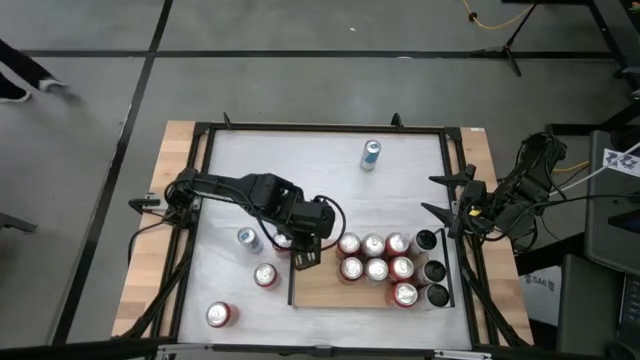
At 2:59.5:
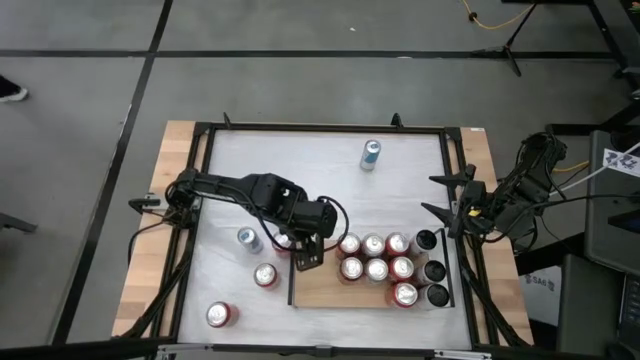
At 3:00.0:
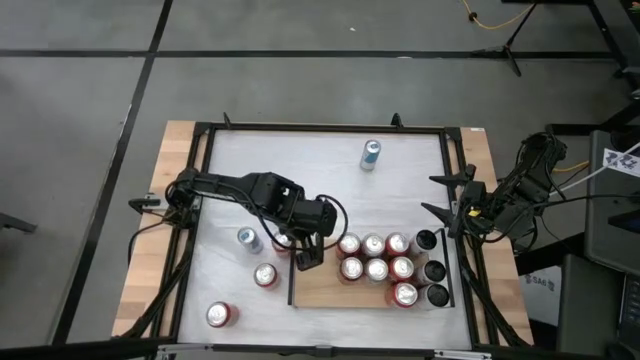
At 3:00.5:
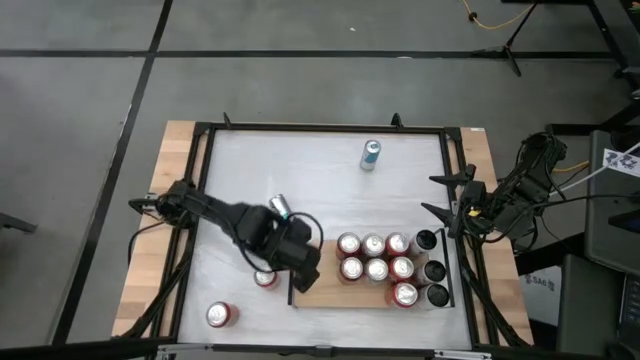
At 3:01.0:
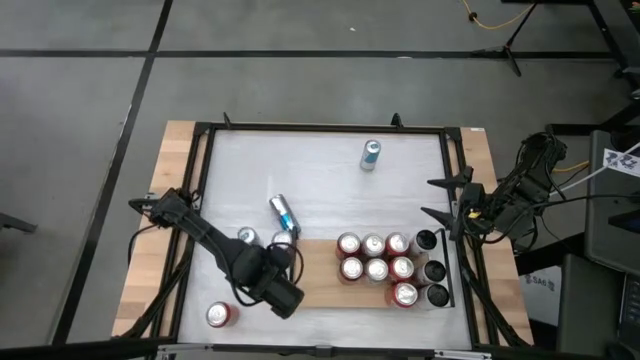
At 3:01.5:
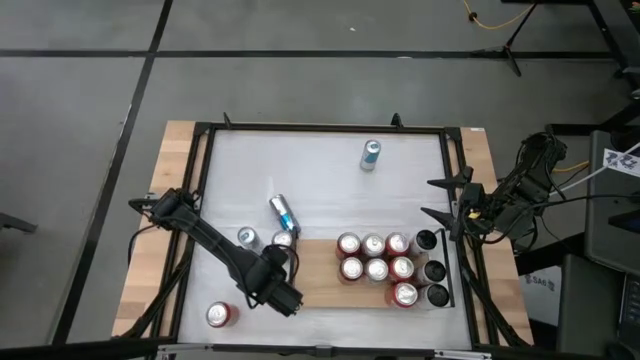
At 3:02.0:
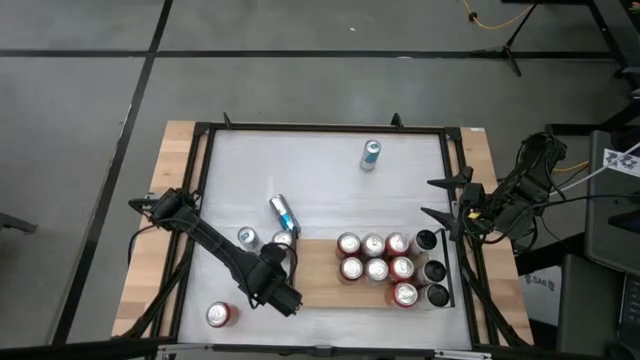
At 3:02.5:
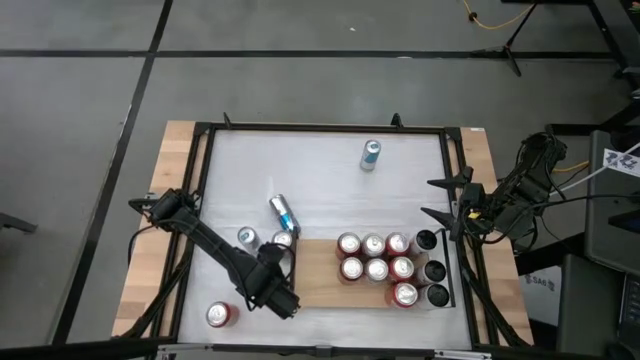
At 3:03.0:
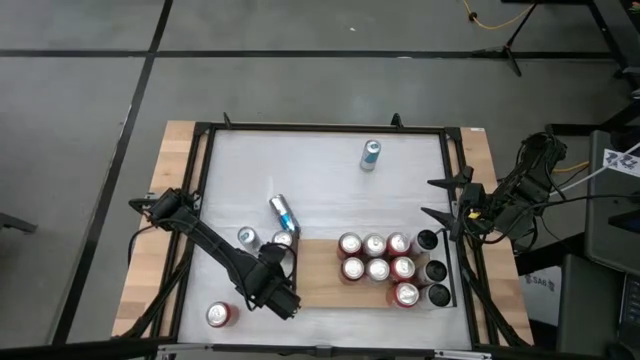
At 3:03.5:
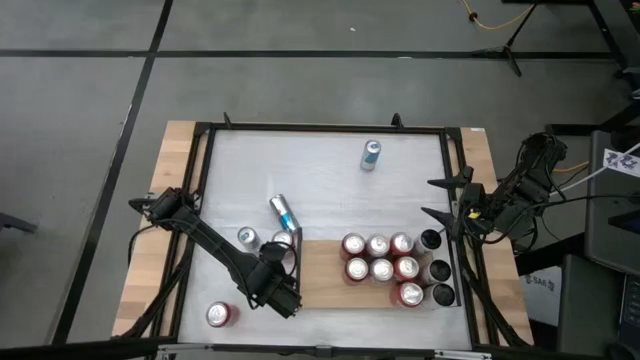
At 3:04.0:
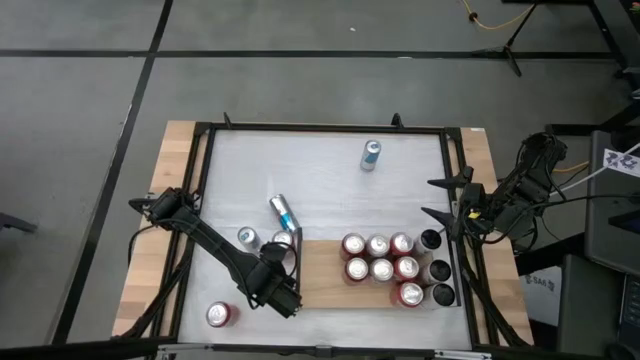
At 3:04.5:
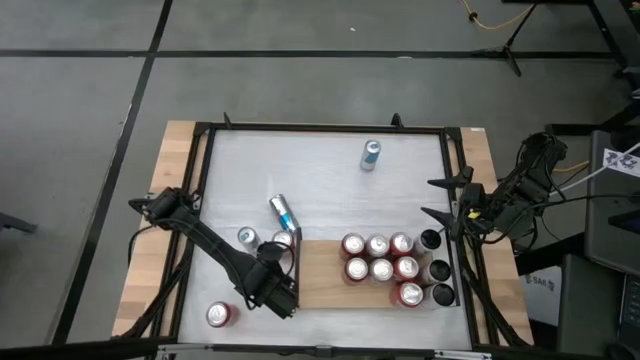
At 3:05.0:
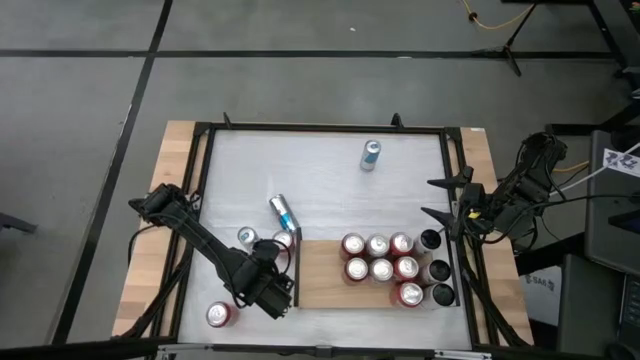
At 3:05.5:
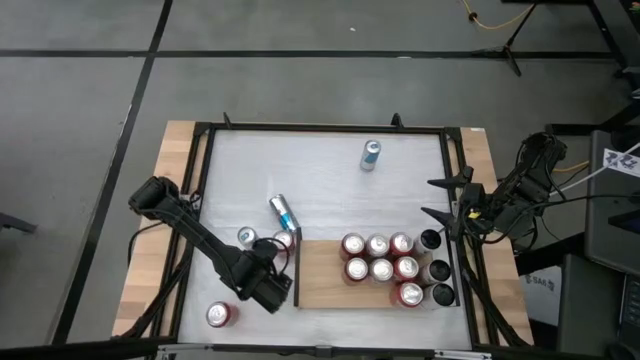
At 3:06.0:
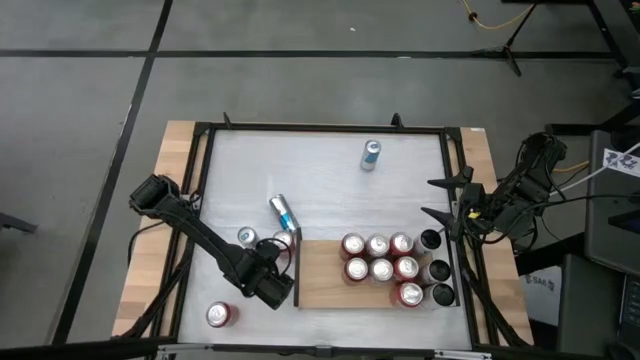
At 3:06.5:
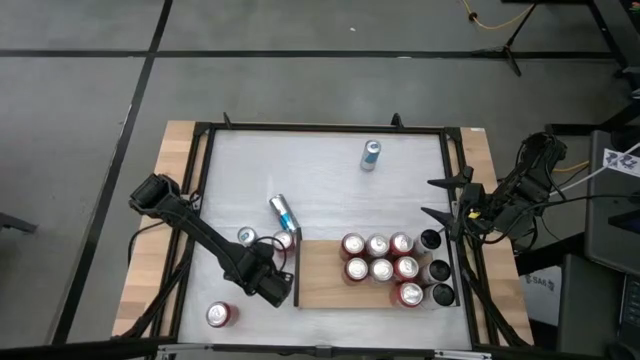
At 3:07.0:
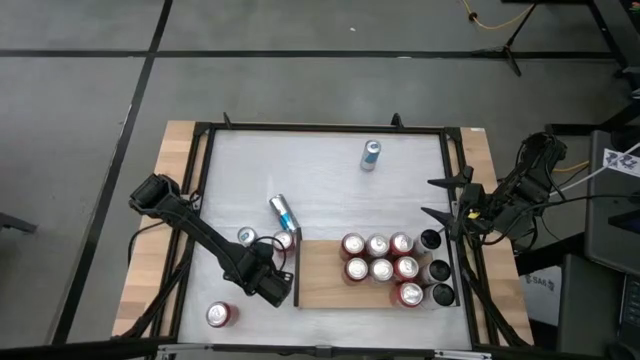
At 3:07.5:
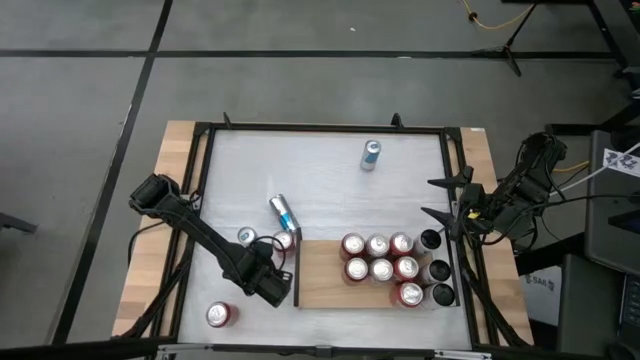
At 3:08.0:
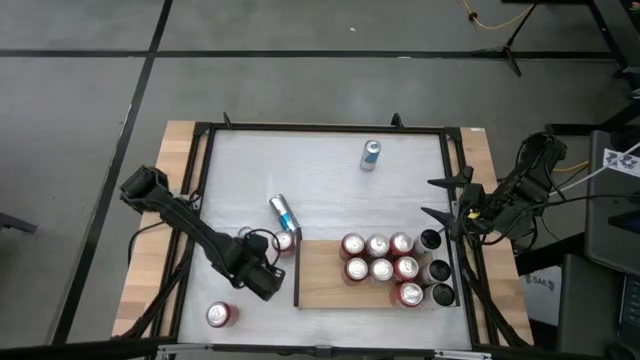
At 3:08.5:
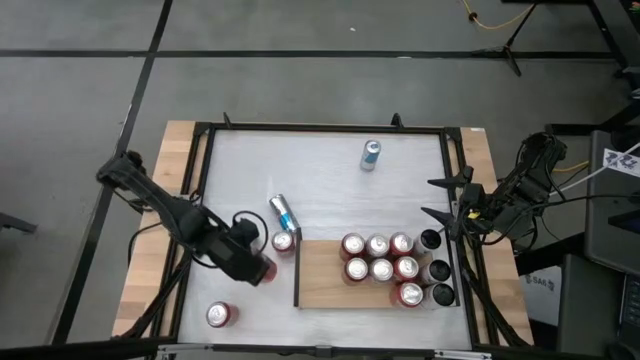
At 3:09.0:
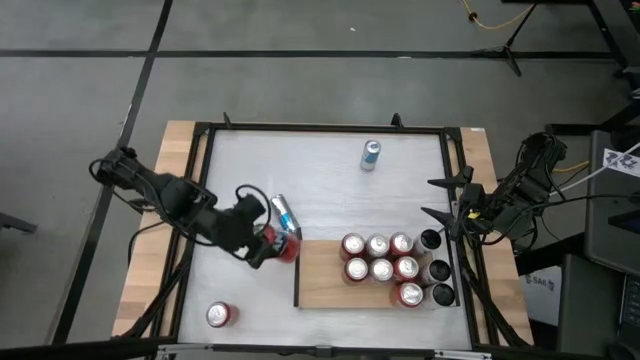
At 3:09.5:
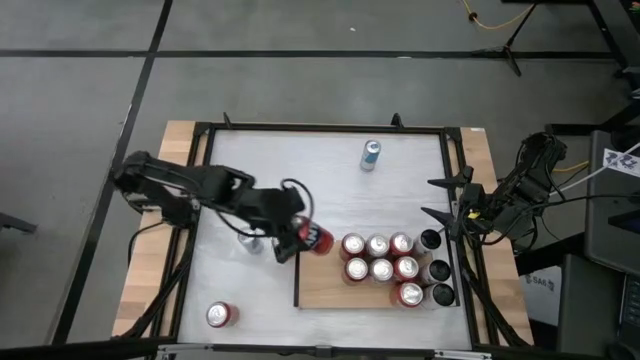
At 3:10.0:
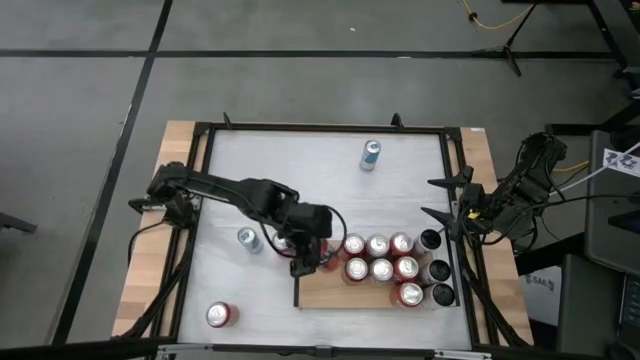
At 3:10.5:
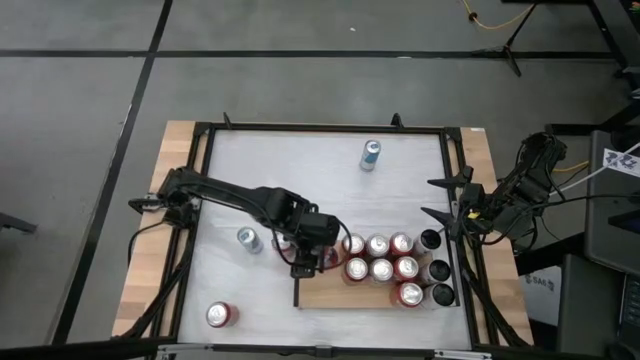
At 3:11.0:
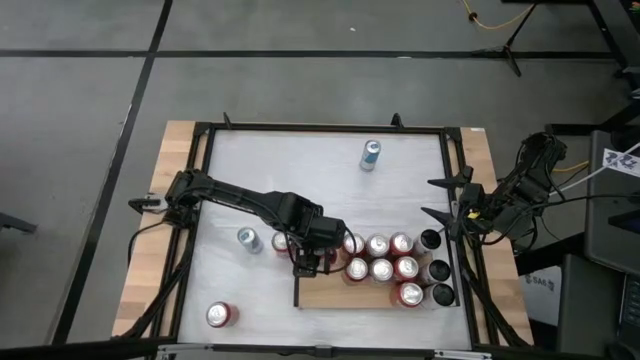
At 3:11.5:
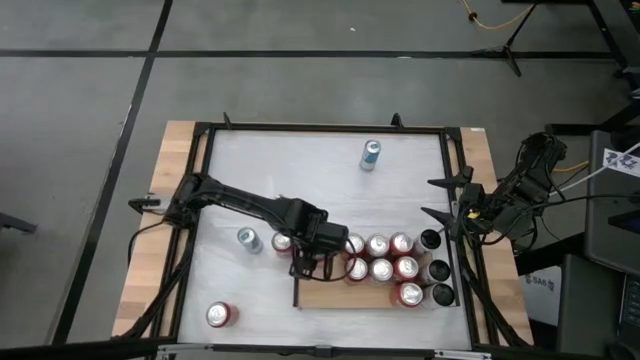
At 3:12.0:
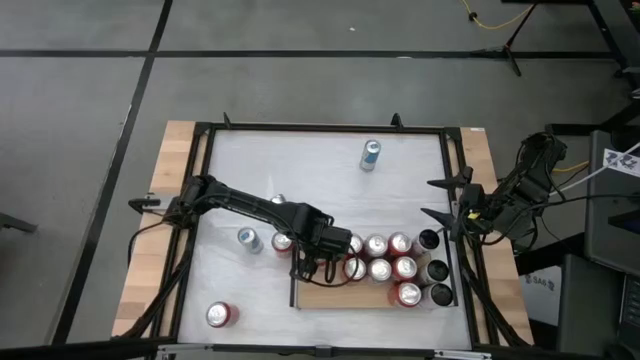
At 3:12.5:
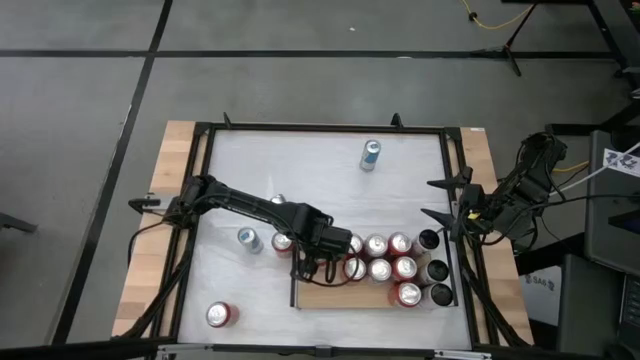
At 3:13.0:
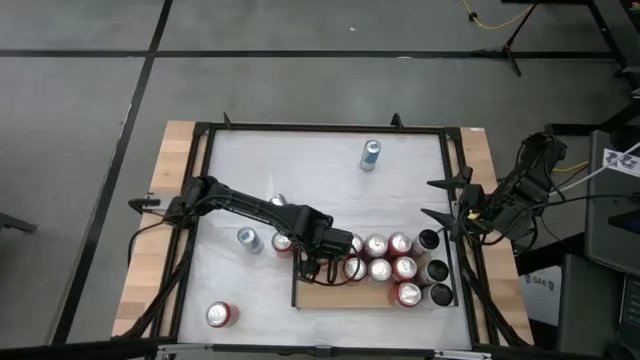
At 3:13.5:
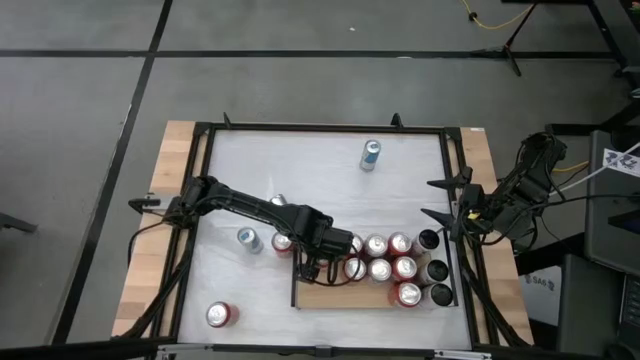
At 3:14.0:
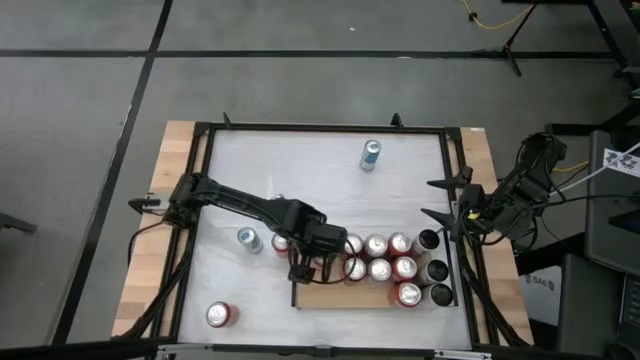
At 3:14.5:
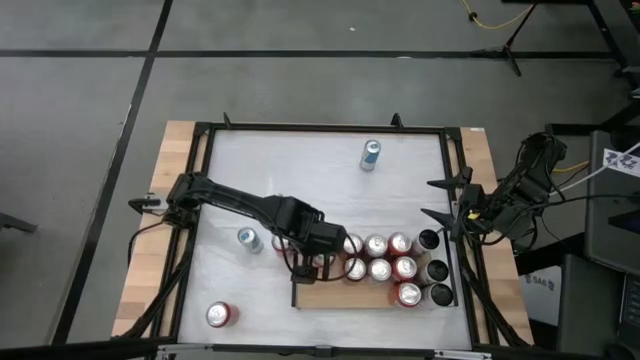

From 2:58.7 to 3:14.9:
Task: Place canned beverage on shelf
Put the left center orange soda can on the shelf

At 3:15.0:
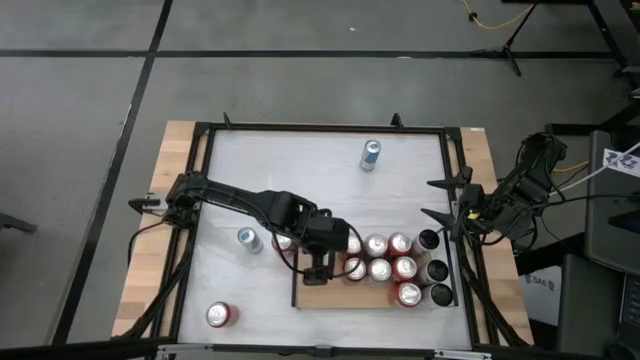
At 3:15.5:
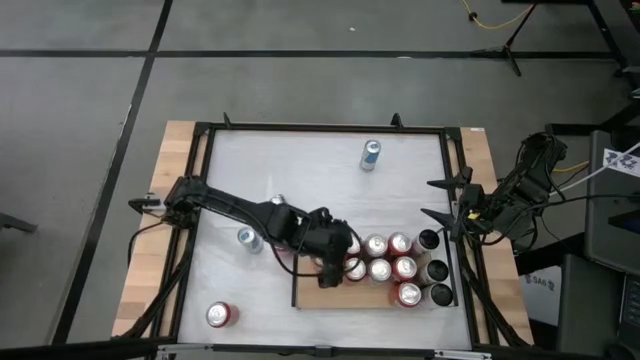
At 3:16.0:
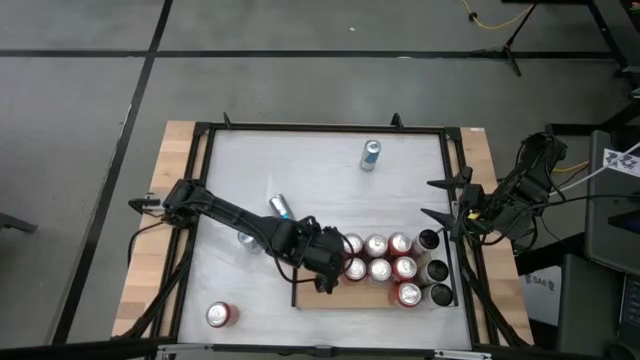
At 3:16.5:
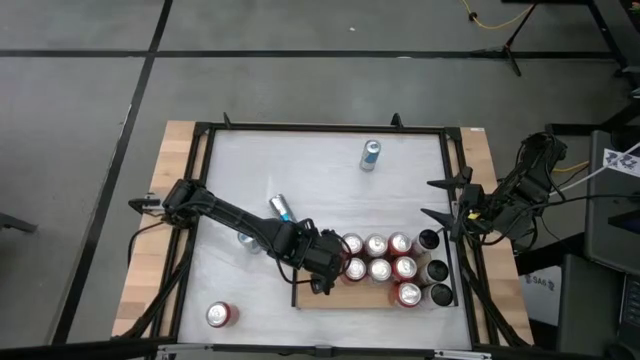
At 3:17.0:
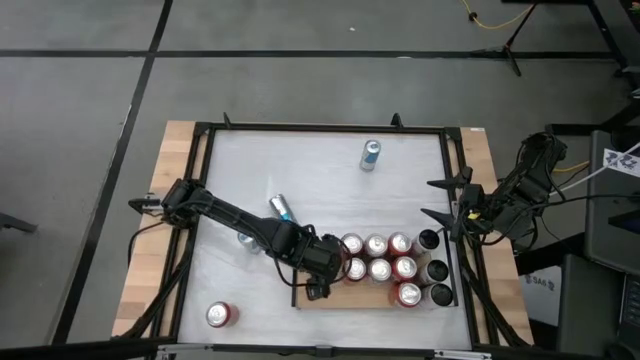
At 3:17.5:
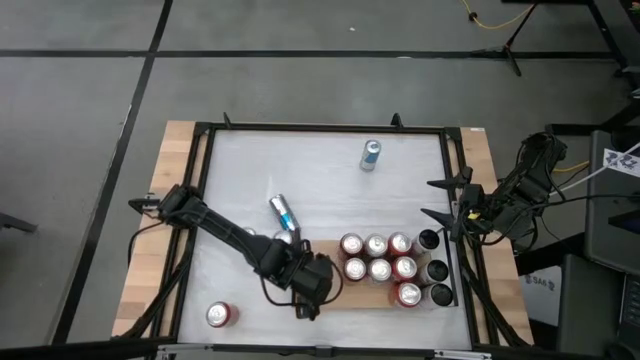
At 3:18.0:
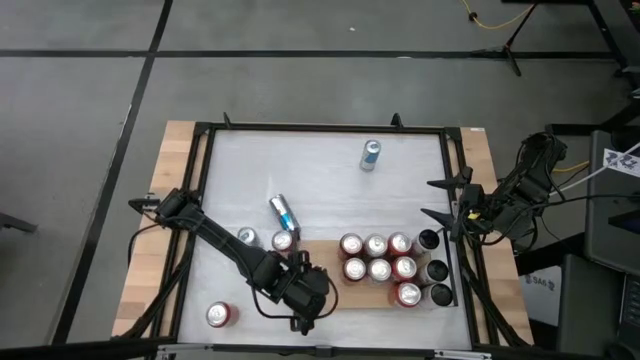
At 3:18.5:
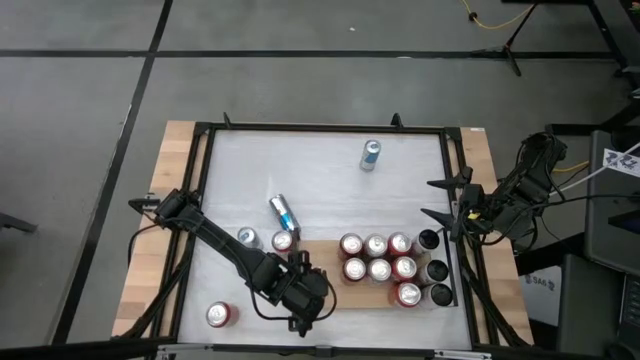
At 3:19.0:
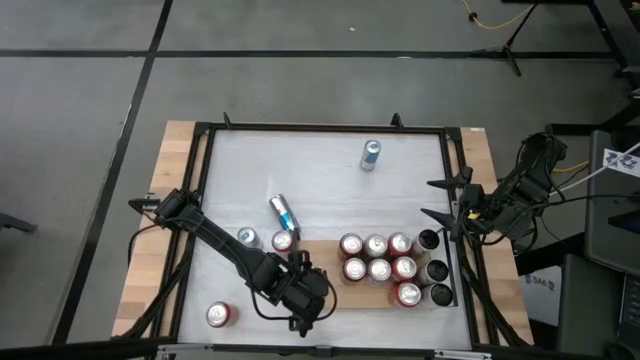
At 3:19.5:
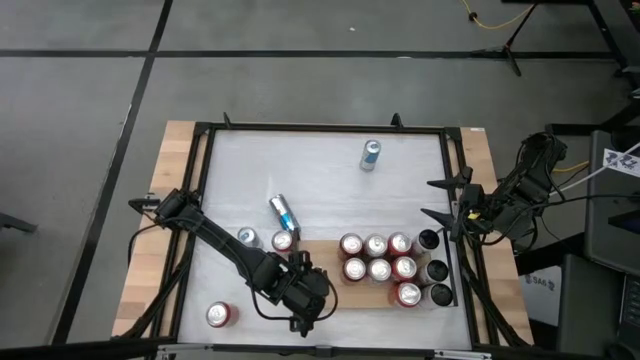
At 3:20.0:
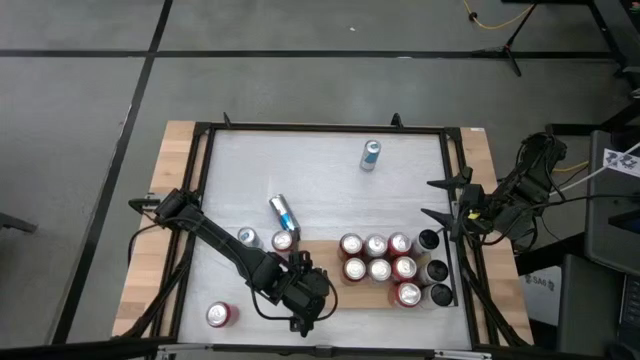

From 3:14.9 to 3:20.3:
Adjust the orange soda can
